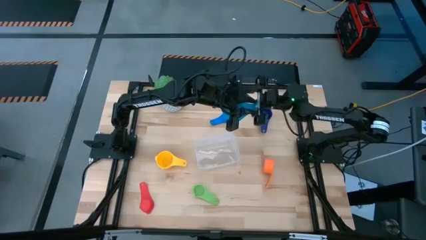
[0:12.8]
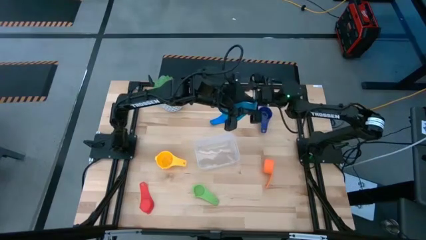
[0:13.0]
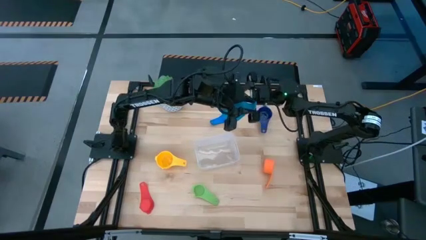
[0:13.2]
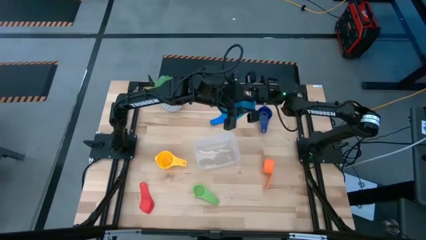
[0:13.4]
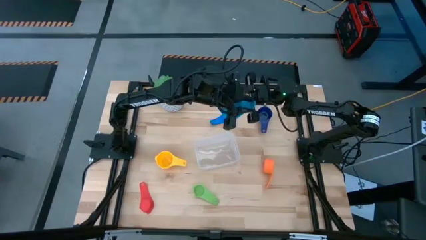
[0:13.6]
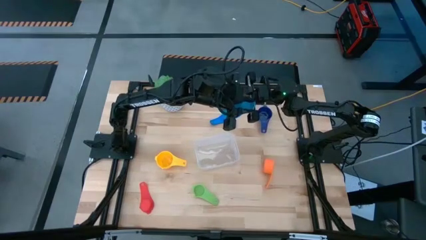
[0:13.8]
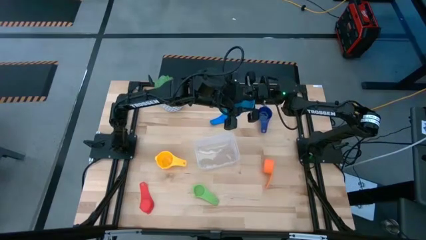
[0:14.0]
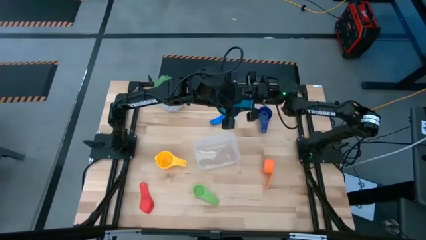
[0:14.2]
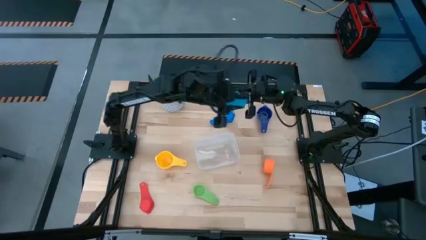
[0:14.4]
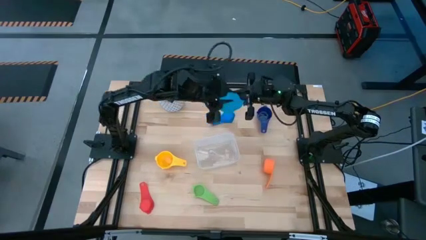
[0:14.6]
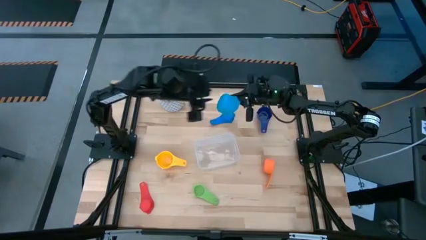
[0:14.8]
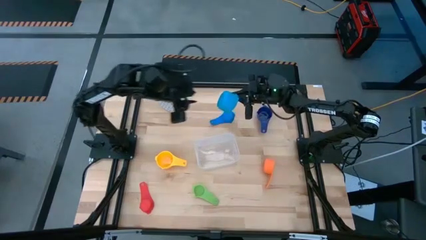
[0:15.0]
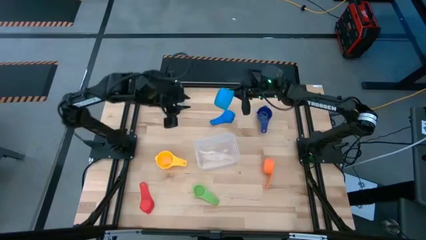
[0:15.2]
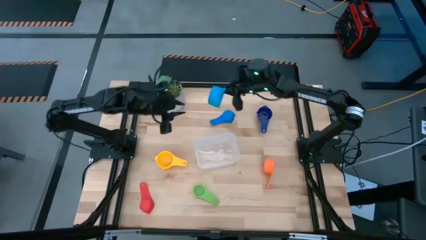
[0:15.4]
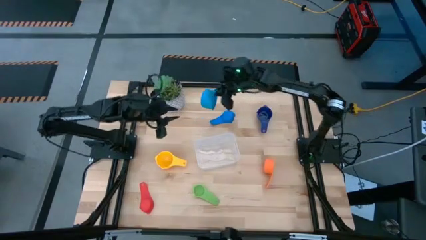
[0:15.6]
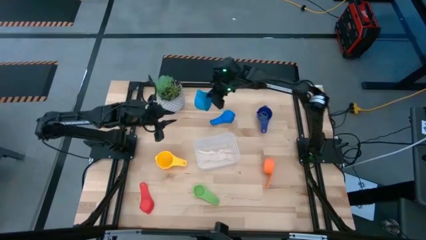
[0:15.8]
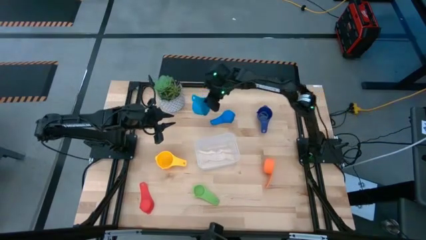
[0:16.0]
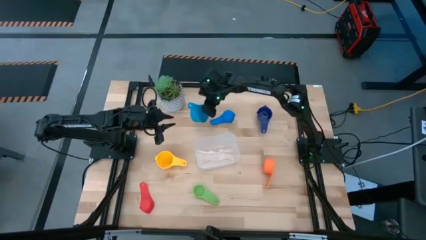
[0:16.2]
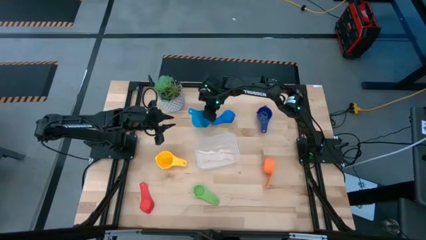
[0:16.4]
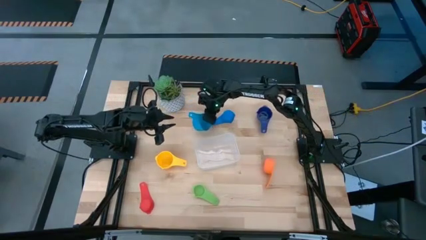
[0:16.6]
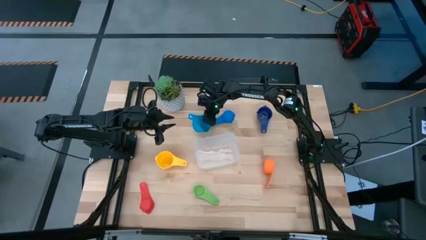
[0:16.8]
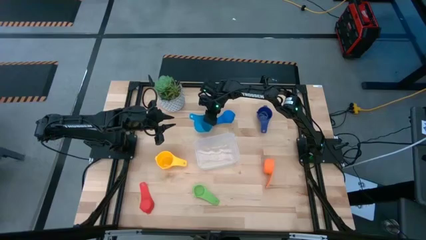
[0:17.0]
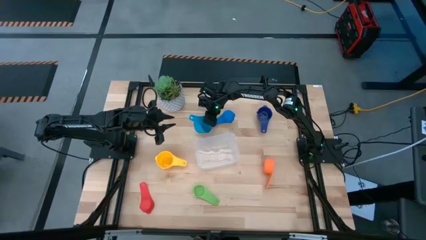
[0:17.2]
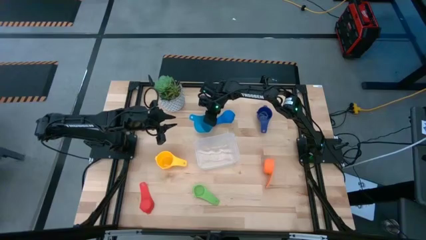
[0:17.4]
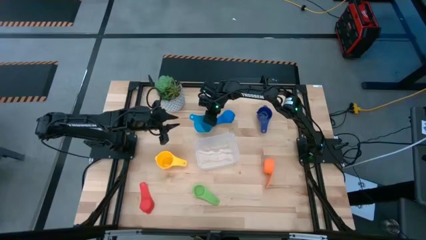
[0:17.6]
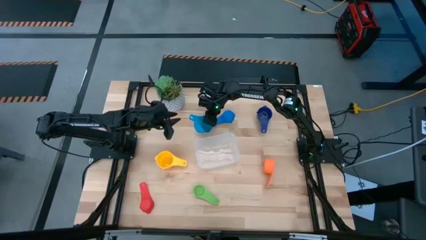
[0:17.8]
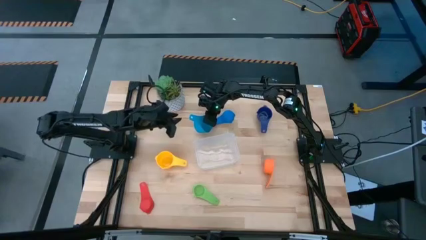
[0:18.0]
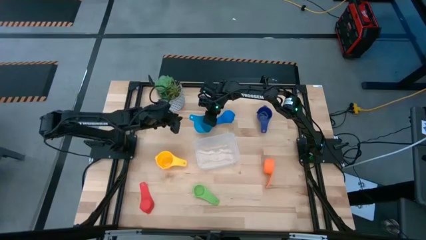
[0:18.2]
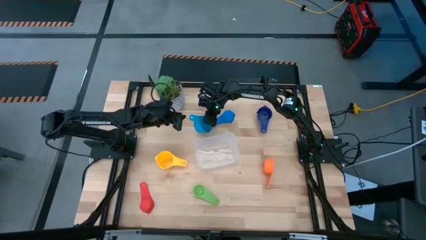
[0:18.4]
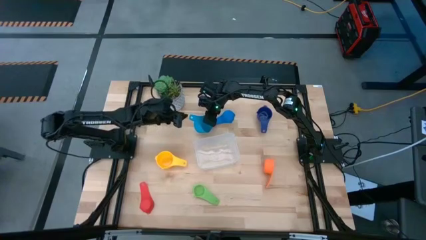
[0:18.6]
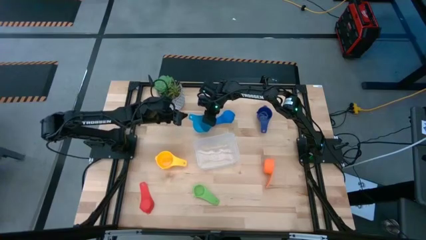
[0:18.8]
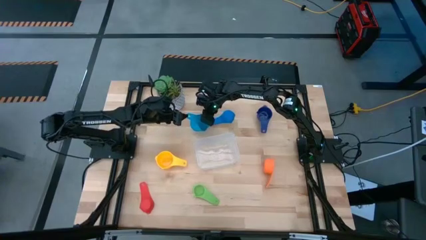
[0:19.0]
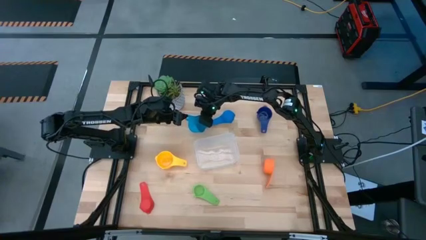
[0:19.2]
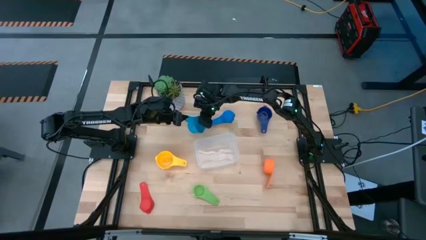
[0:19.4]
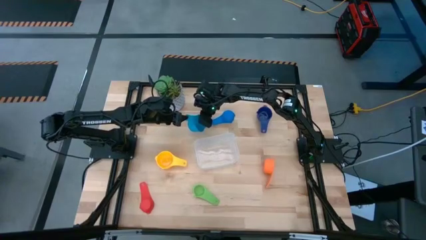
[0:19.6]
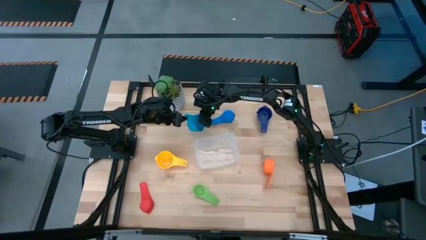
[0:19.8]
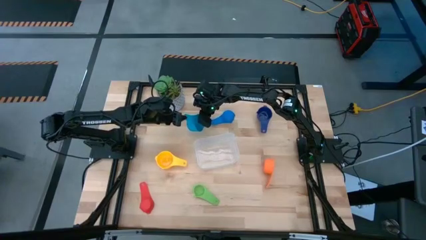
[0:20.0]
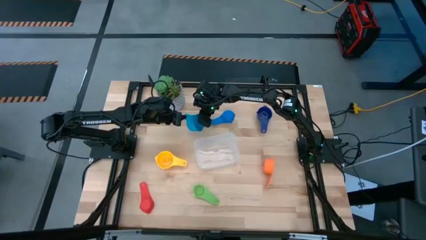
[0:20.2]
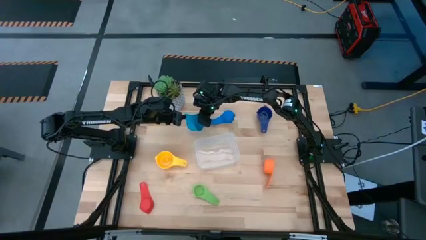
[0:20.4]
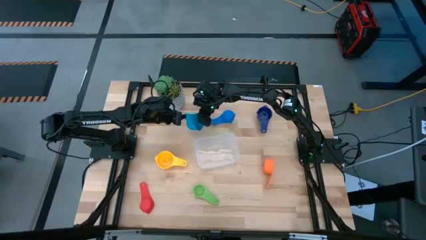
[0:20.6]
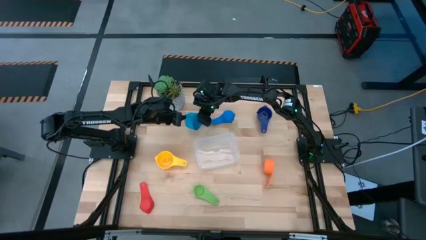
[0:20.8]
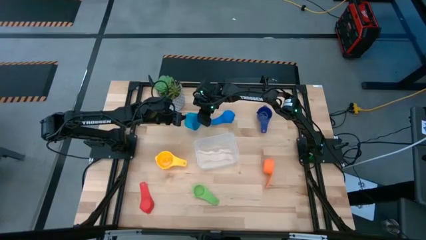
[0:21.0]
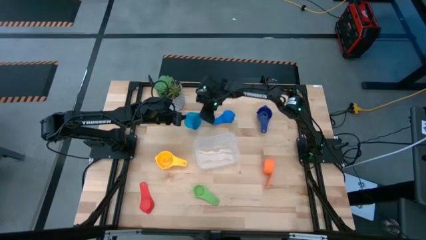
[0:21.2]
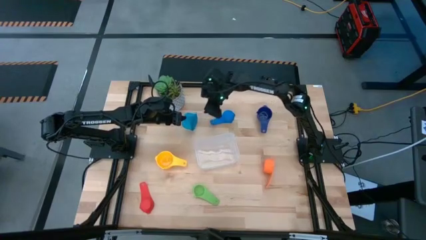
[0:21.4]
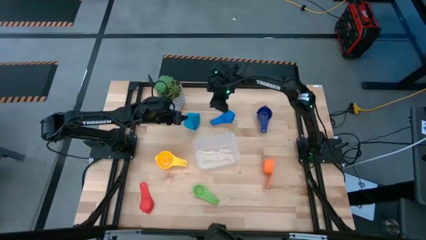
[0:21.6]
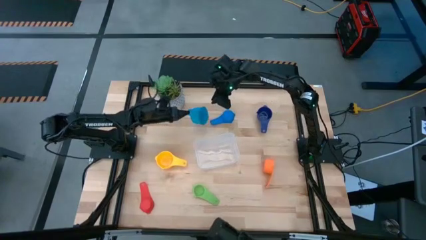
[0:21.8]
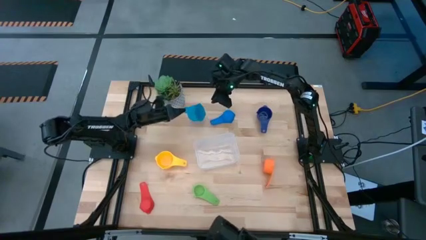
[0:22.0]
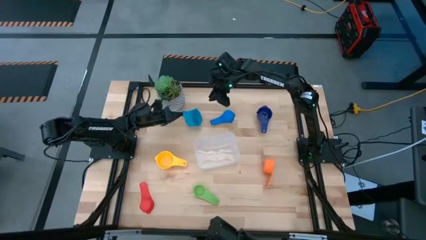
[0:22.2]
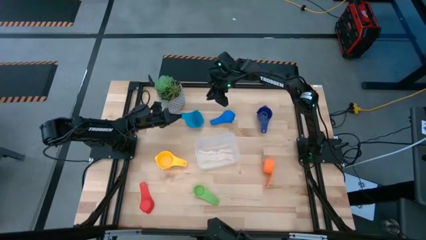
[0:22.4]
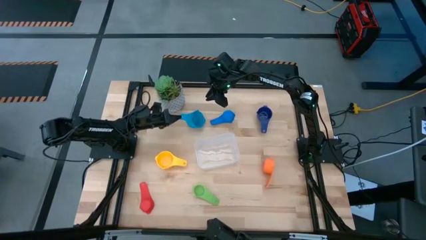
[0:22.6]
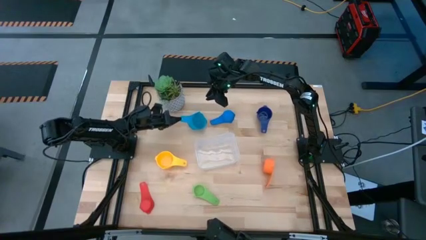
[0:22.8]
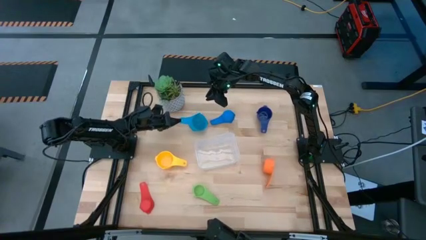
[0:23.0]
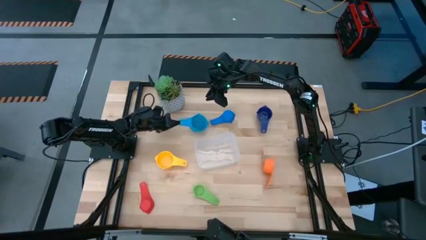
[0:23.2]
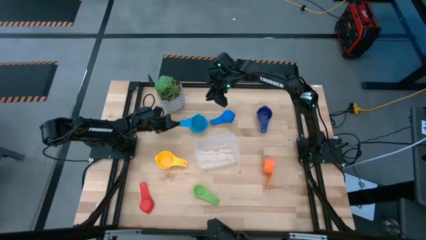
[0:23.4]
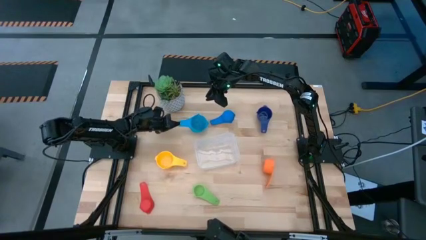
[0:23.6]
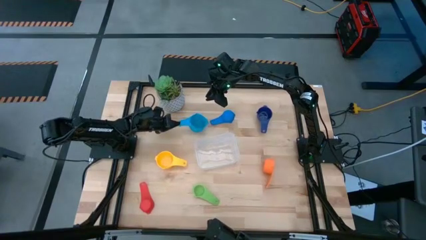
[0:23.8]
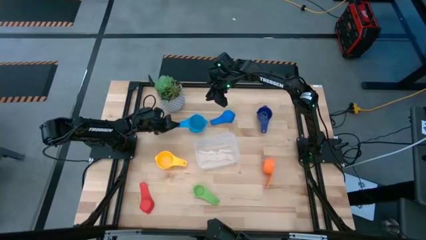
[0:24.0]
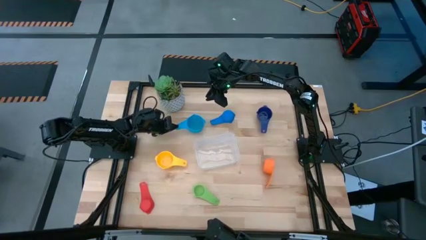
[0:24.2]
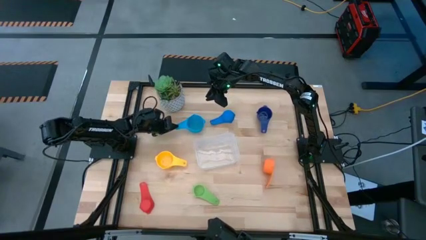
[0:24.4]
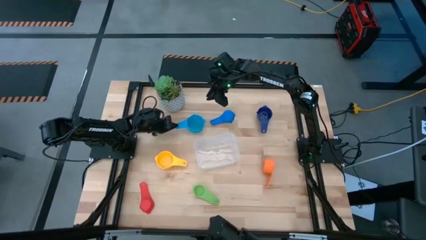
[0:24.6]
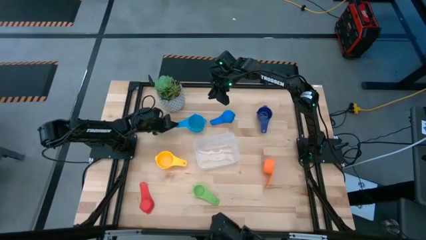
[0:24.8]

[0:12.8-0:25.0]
Task: Nest measuring cups in basket
Prepare the light blue measuring cup
